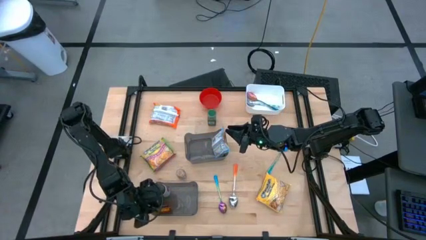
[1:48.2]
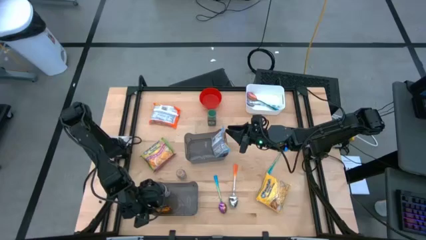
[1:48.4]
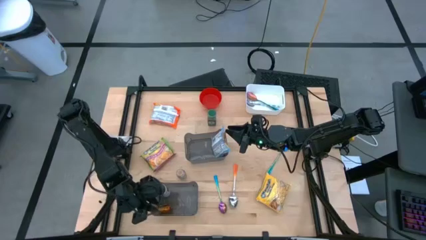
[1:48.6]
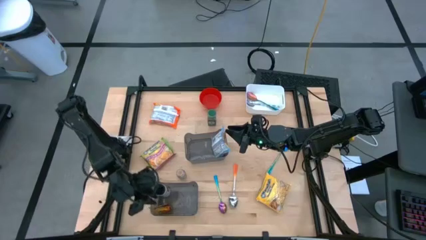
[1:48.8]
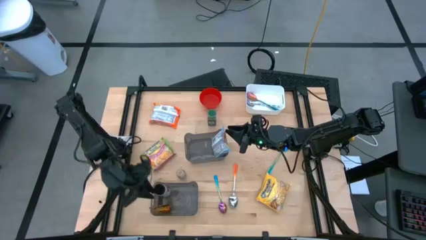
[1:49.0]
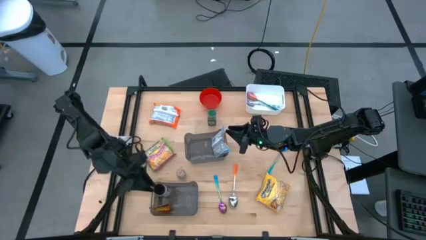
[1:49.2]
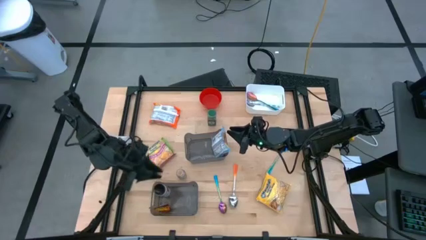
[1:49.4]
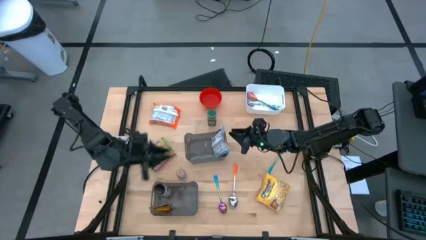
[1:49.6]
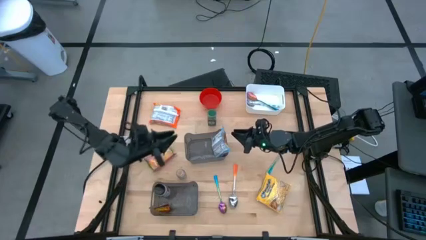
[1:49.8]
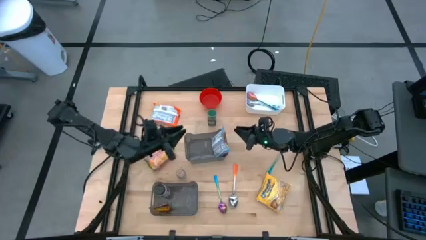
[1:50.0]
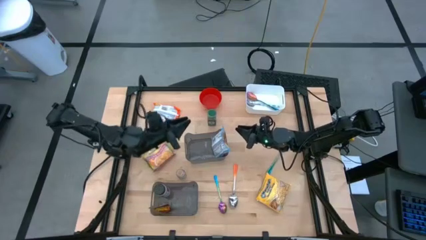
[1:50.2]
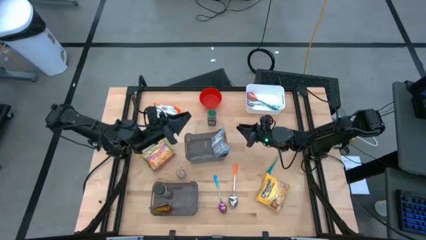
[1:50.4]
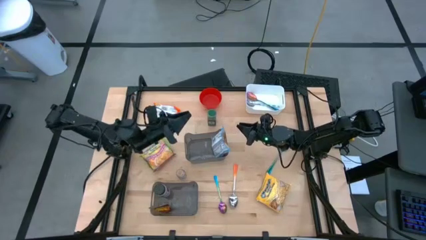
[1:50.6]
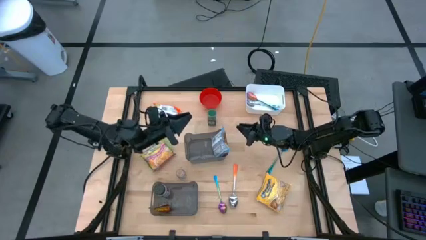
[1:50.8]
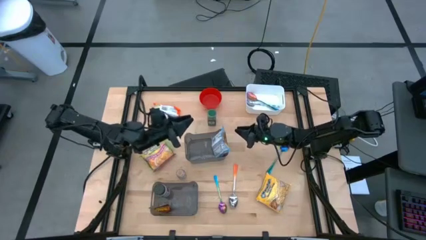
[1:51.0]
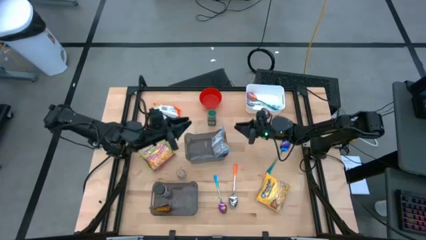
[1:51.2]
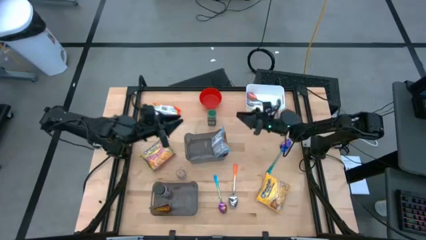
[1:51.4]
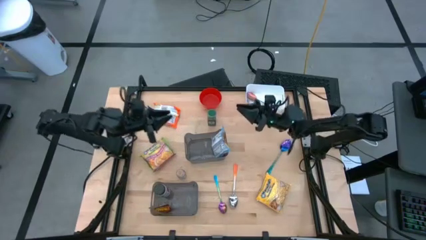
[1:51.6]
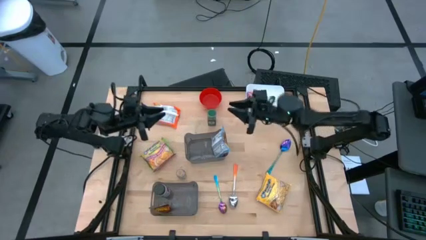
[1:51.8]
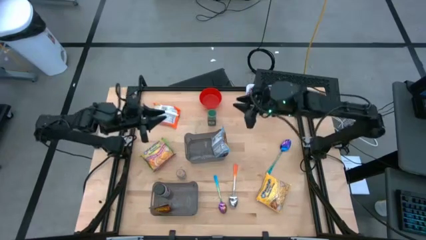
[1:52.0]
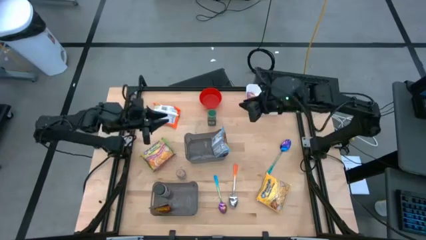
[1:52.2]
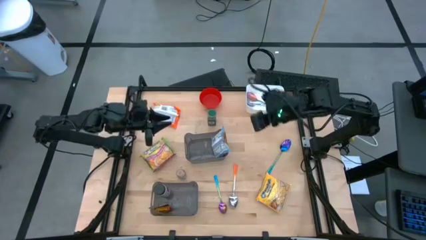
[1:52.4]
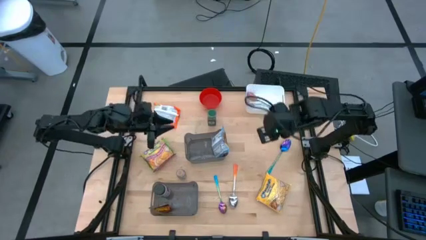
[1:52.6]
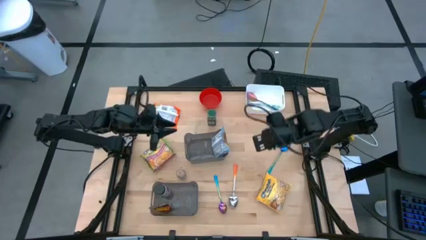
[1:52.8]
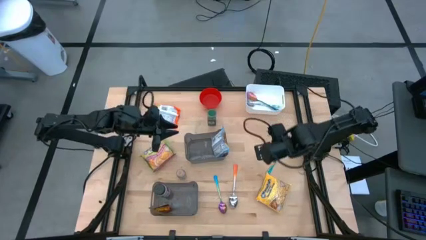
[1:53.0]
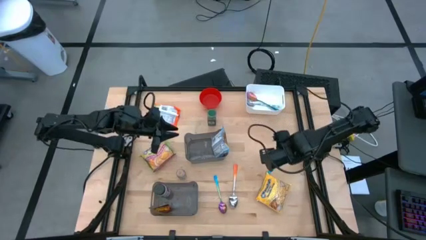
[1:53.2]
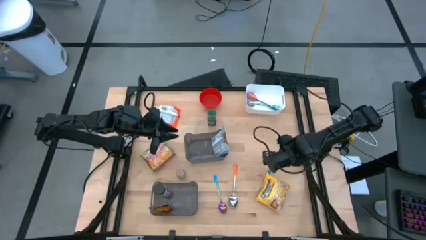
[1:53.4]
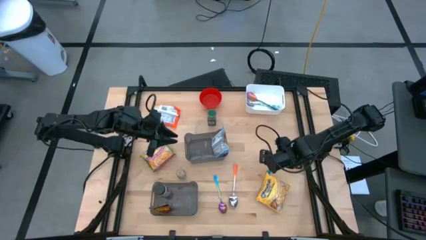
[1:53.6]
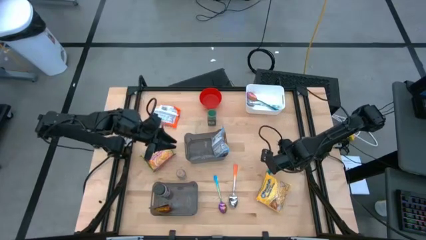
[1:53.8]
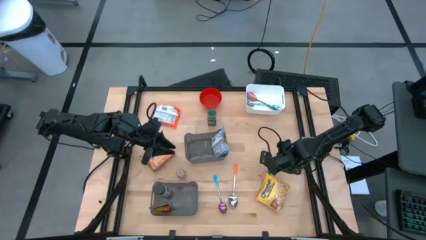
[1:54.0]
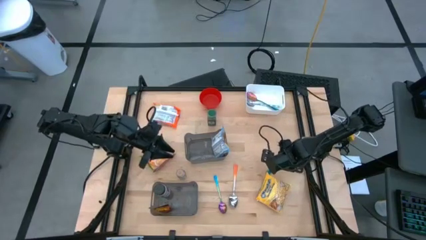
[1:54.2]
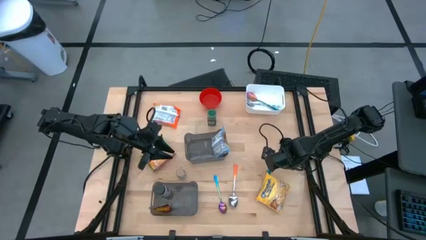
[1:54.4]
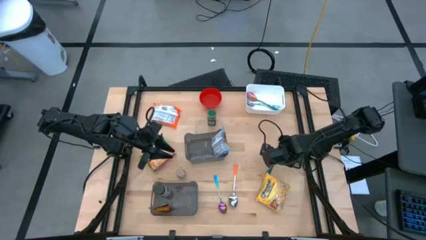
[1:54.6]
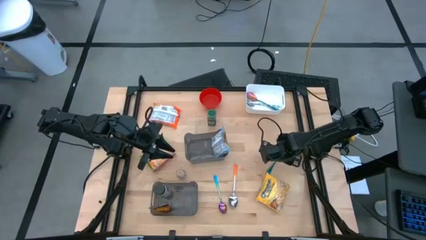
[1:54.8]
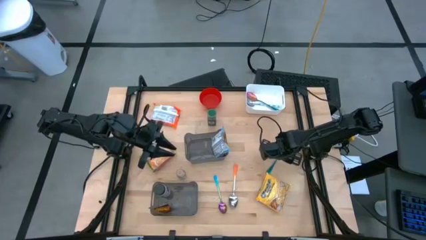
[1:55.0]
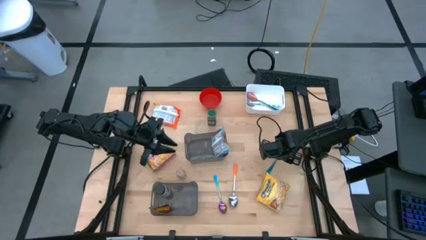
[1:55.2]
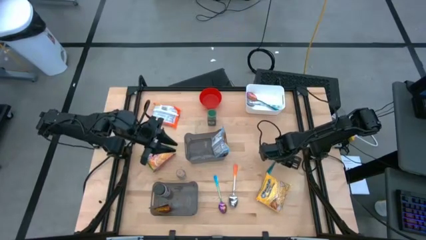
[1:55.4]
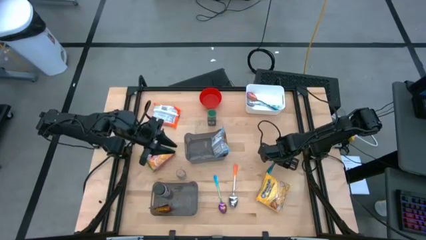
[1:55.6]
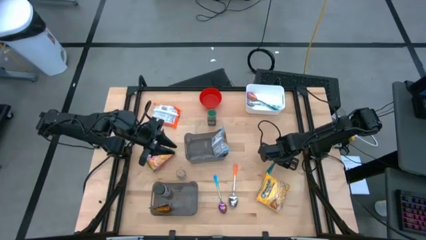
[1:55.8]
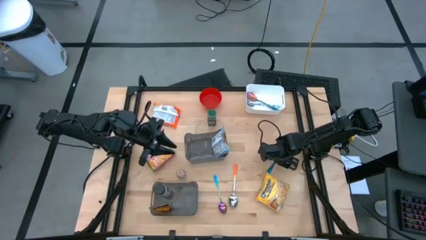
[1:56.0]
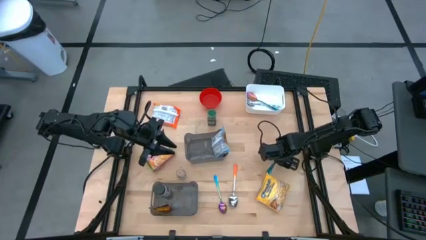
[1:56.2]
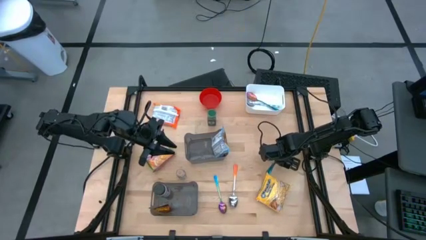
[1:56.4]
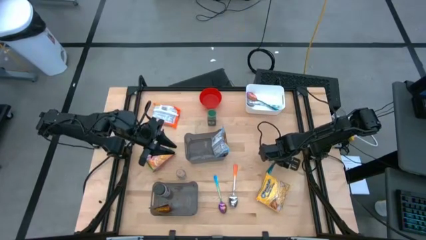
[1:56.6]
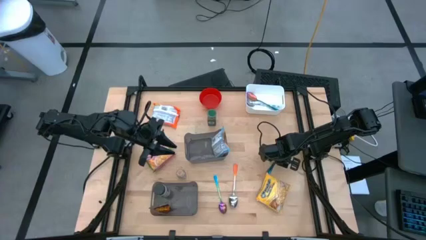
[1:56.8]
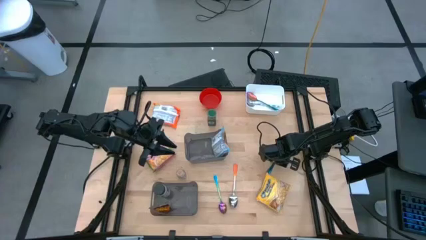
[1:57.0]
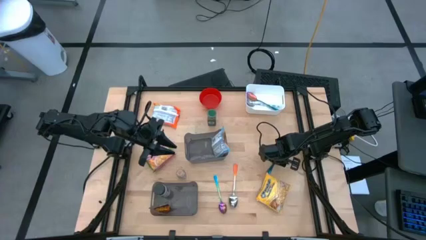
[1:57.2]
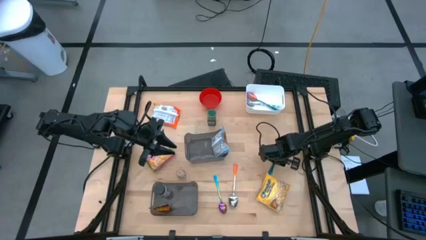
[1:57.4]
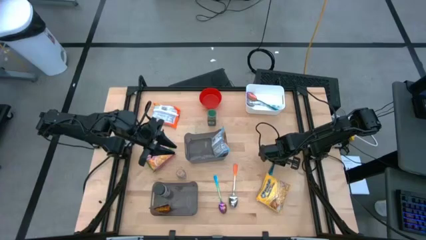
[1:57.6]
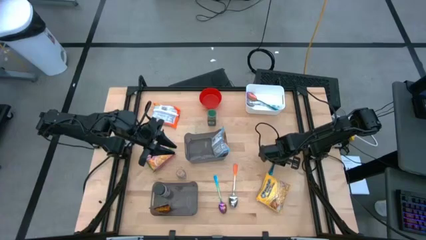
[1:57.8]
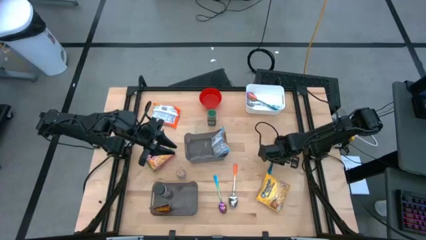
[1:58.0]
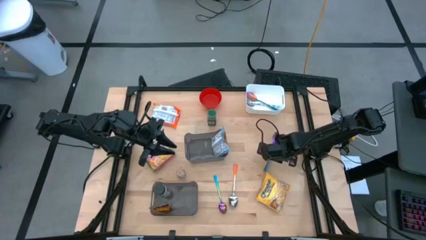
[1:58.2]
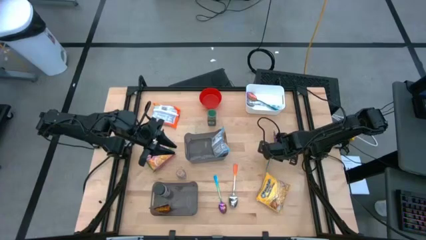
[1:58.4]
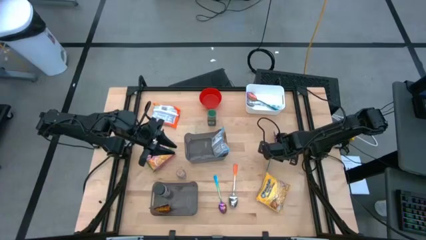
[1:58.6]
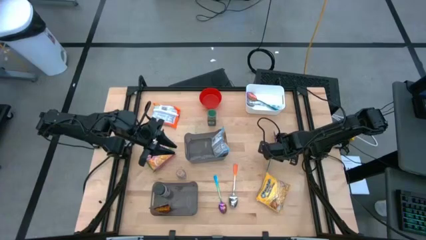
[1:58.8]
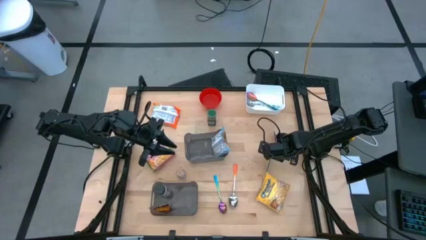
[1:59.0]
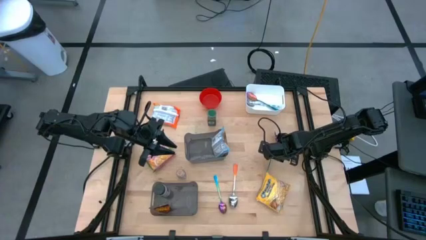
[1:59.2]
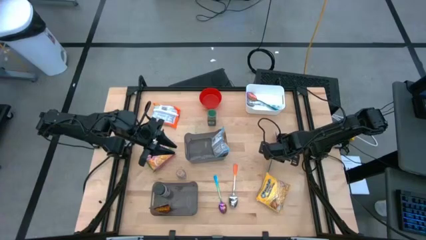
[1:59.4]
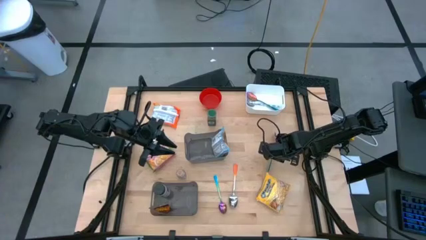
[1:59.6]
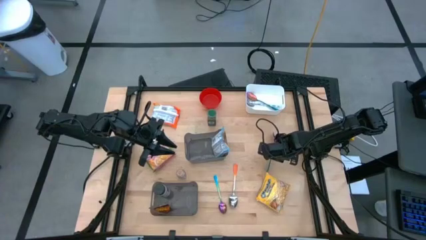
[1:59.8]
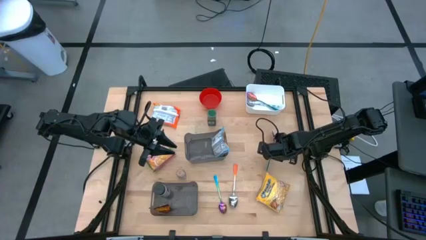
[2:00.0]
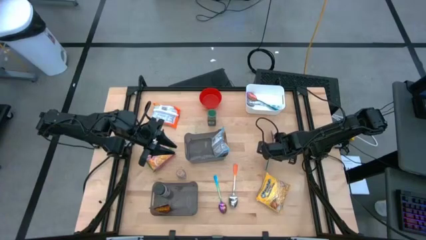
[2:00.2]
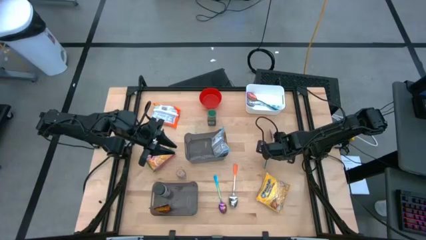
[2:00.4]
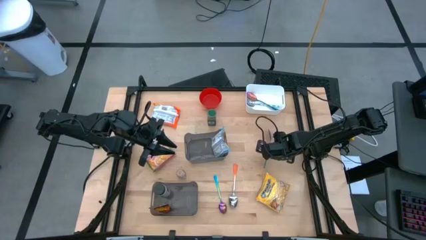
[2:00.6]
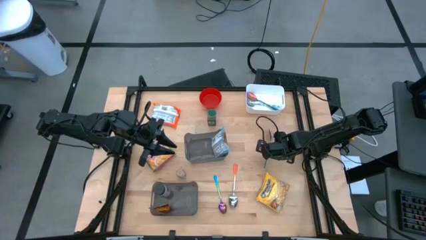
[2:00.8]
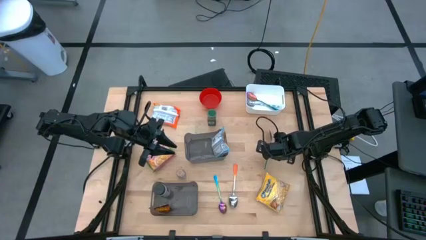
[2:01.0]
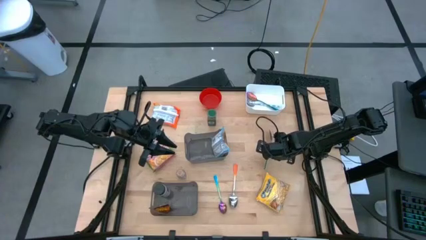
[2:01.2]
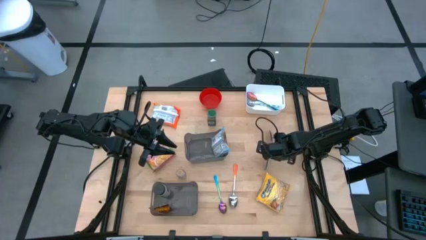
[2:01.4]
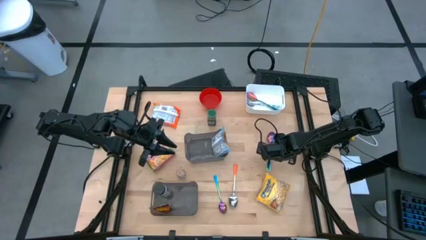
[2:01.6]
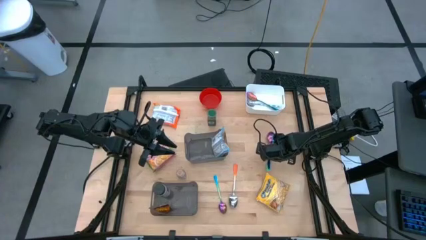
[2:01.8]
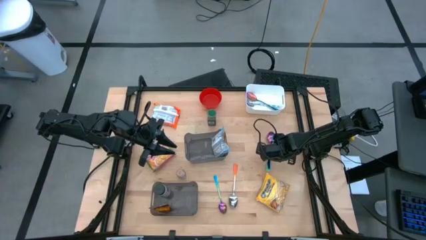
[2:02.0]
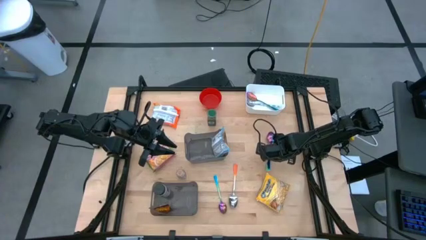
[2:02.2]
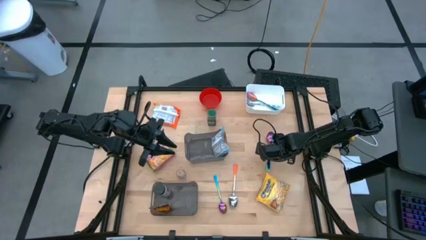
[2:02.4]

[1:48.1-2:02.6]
Task: Pick & Place Food Item
Put the top purple spoon into the white bin

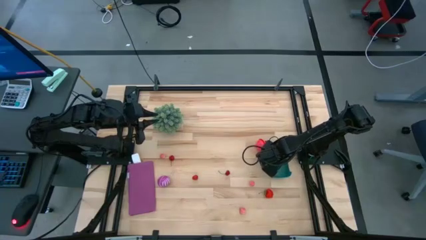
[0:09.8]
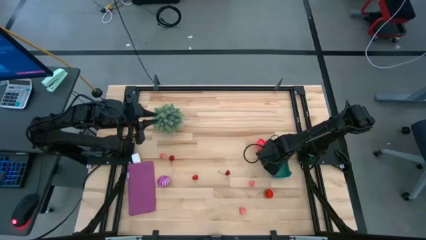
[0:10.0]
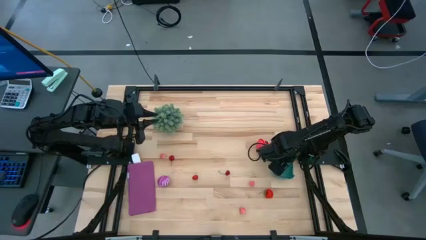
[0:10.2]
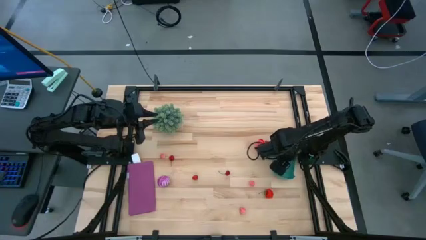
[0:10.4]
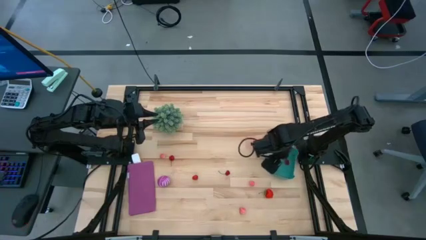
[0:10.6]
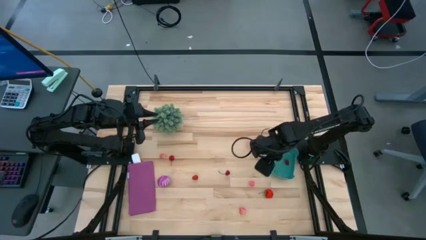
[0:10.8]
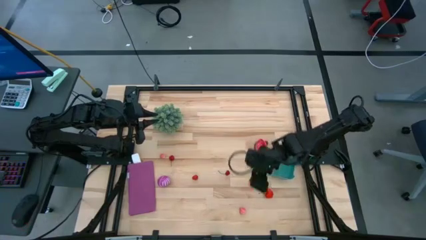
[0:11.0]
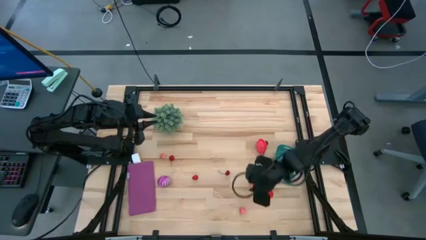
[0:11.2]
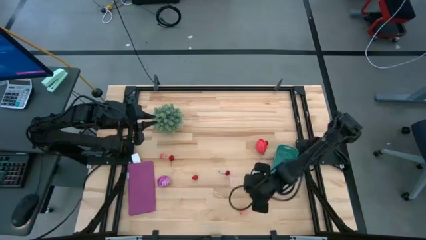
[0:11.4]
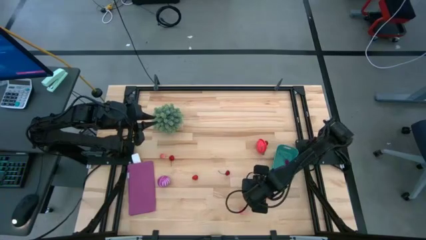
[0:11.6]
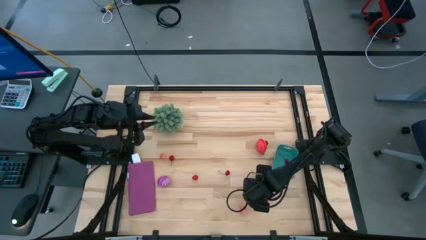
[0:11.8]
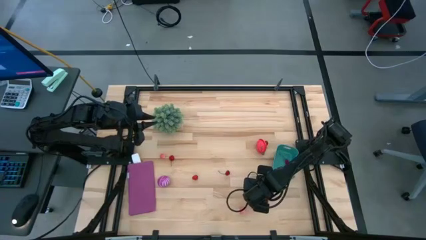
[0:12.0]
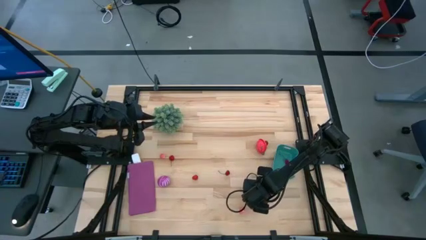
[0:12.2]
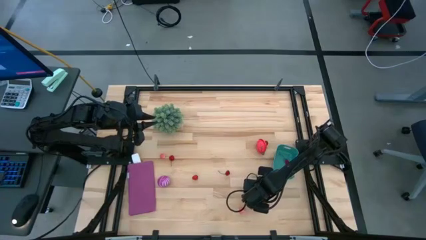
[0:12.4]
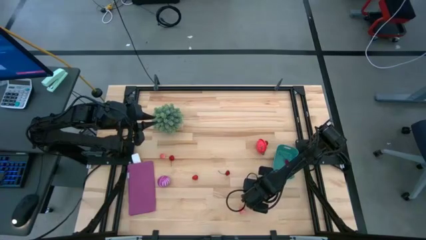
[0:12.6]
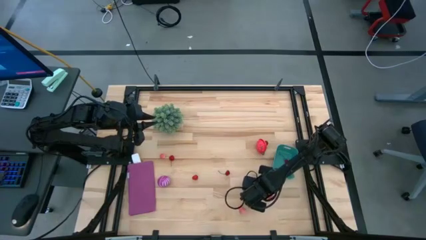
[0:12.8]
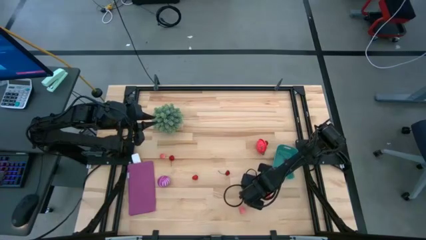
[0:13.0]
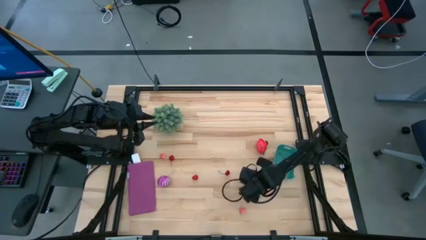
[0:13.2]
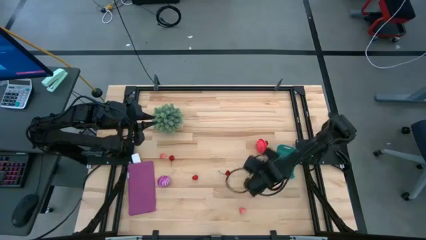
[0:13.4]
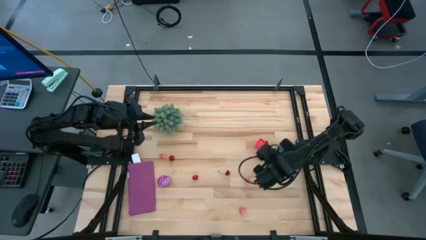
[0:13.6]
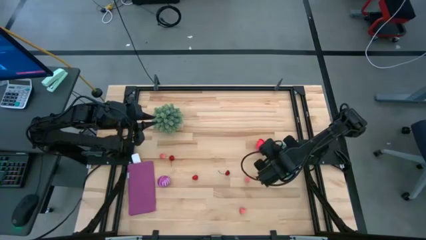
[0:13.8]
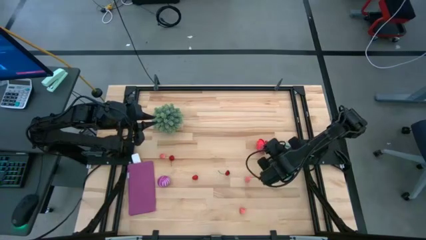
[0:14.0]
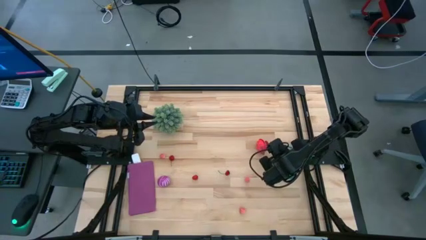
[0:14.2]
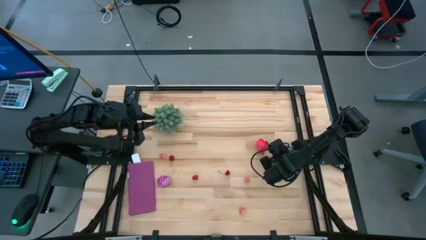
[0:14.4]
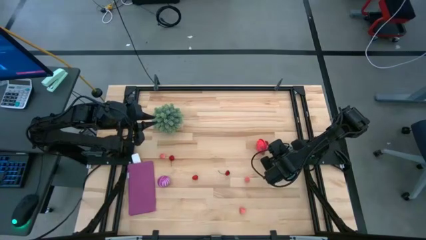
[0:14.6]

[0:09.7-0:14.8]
Task: Pick and placing Produce into tupperware
Put the red strawberry into the green bin
